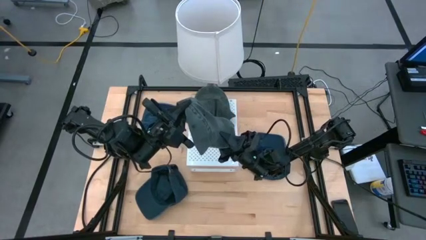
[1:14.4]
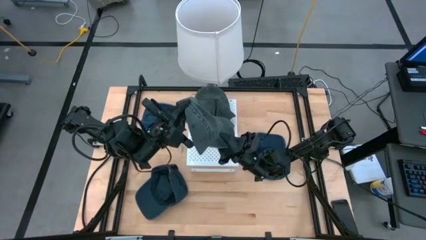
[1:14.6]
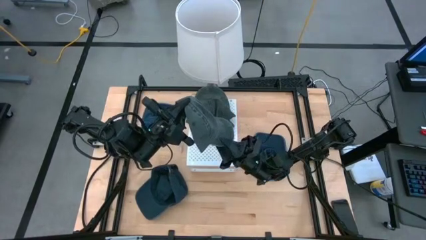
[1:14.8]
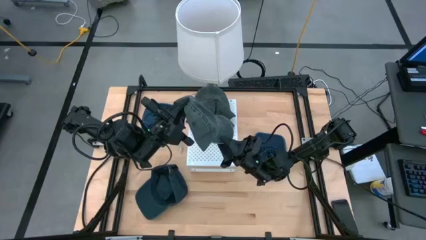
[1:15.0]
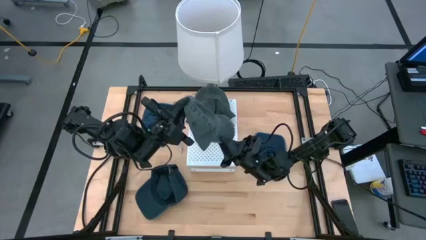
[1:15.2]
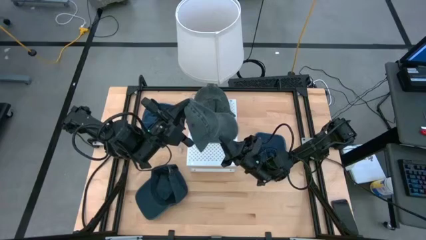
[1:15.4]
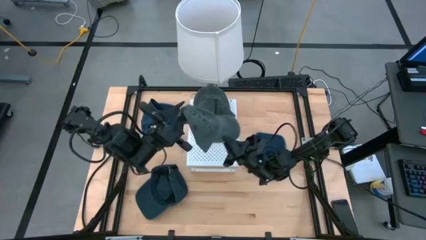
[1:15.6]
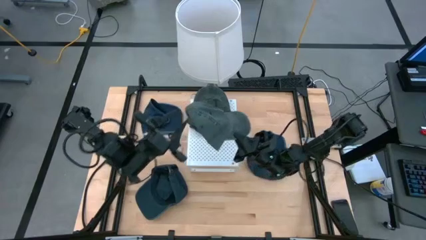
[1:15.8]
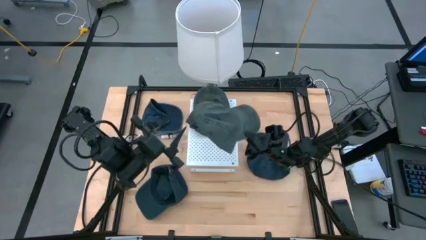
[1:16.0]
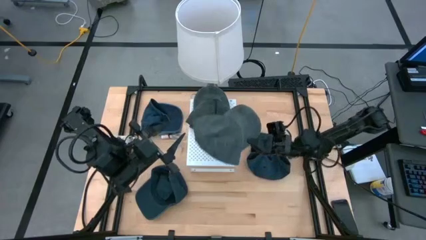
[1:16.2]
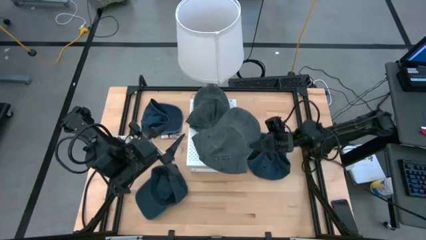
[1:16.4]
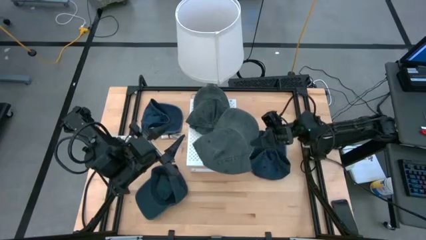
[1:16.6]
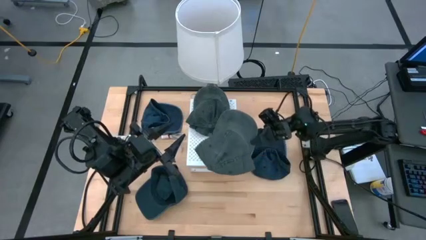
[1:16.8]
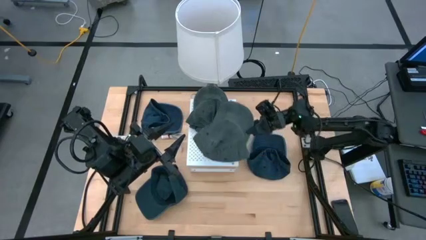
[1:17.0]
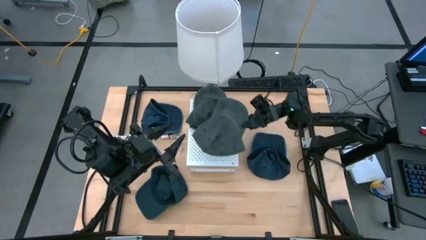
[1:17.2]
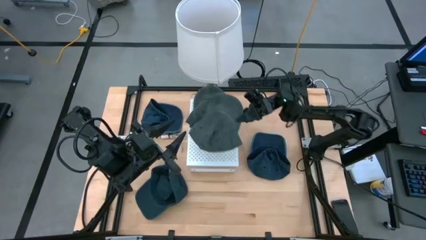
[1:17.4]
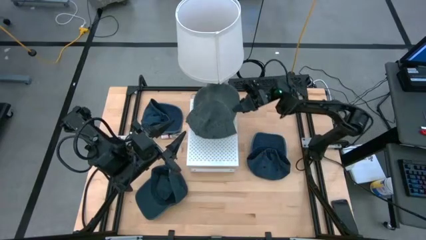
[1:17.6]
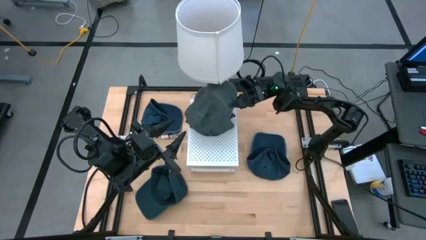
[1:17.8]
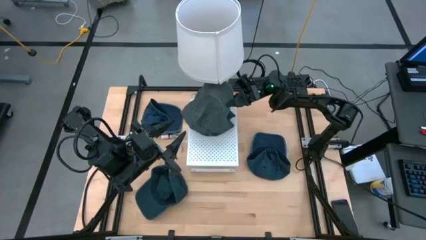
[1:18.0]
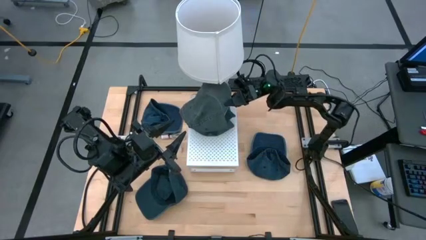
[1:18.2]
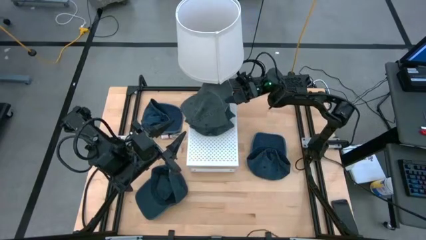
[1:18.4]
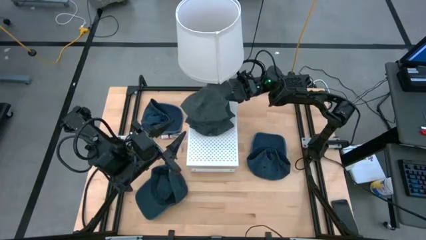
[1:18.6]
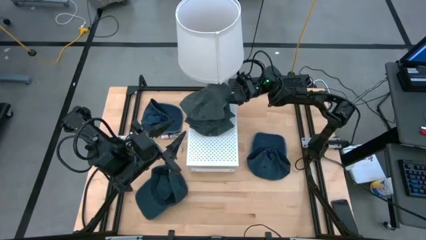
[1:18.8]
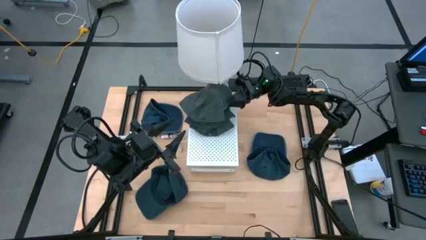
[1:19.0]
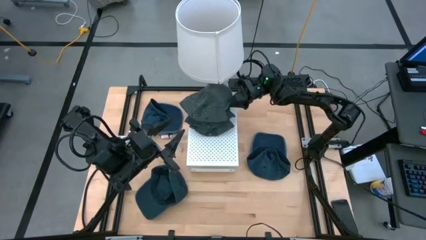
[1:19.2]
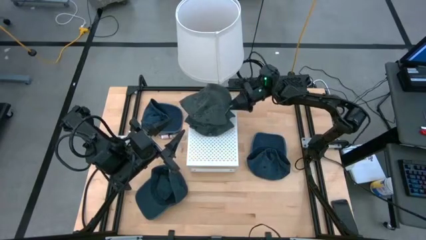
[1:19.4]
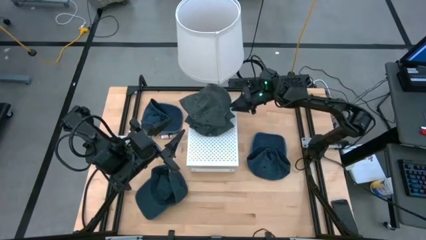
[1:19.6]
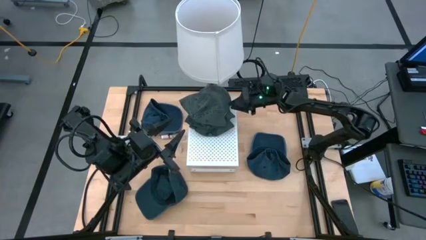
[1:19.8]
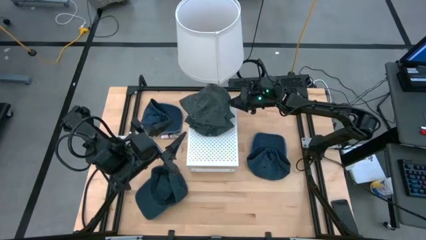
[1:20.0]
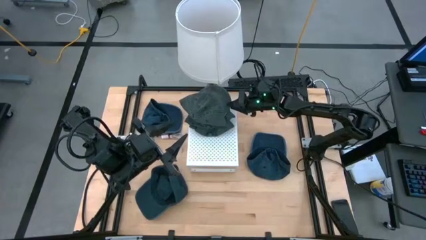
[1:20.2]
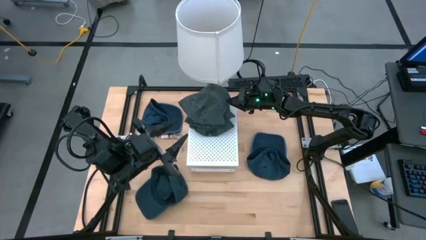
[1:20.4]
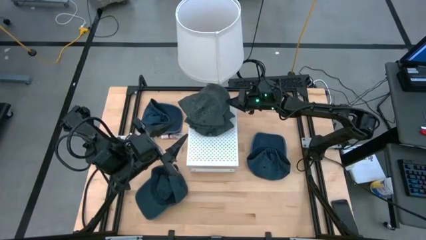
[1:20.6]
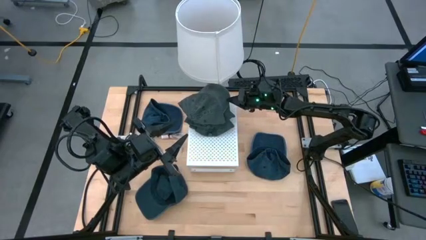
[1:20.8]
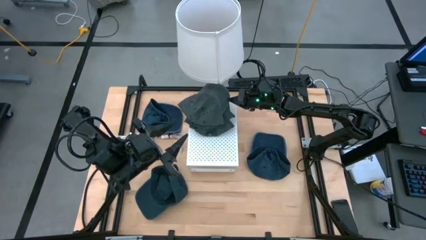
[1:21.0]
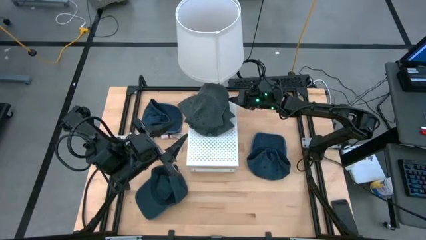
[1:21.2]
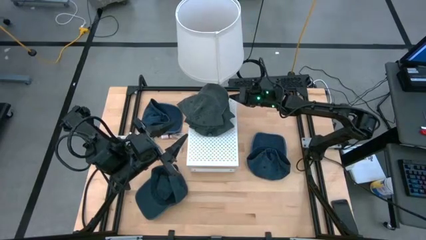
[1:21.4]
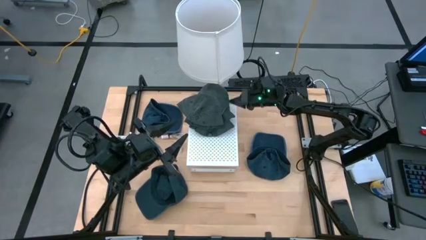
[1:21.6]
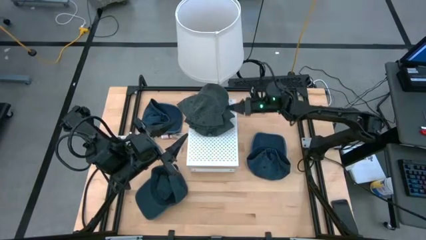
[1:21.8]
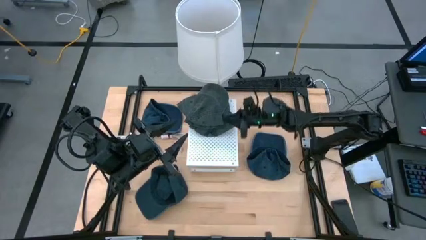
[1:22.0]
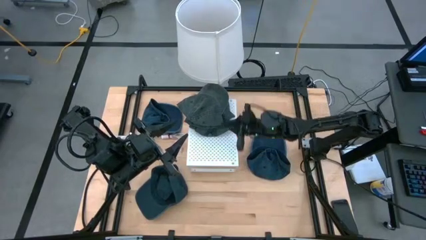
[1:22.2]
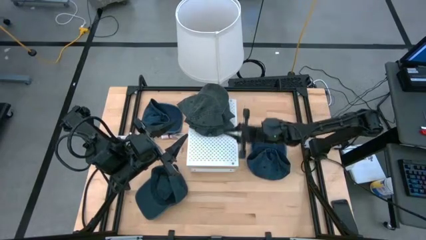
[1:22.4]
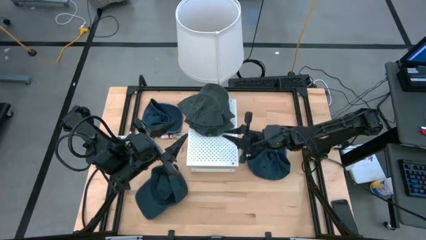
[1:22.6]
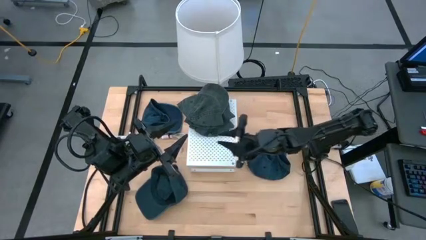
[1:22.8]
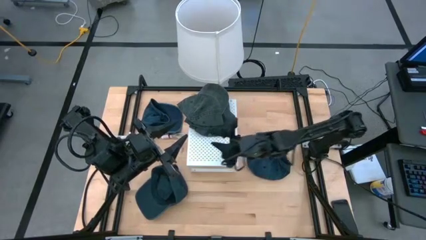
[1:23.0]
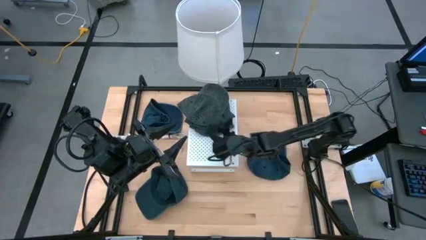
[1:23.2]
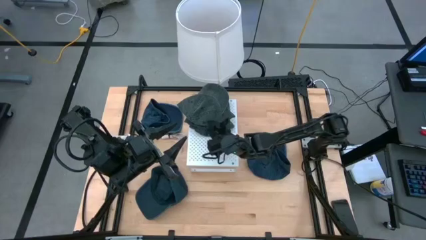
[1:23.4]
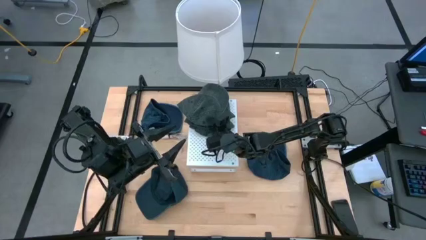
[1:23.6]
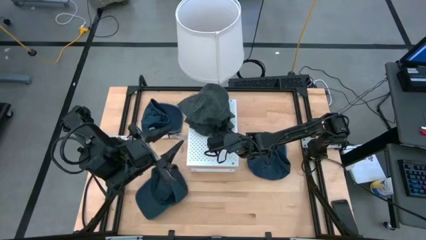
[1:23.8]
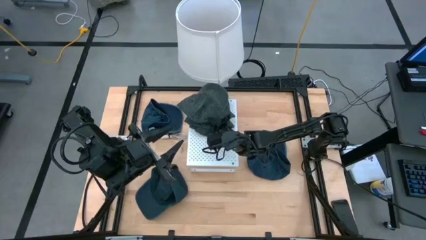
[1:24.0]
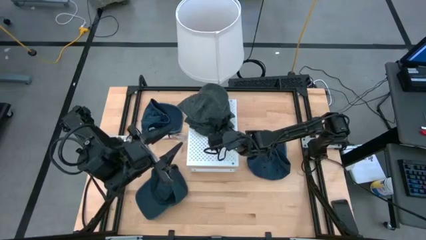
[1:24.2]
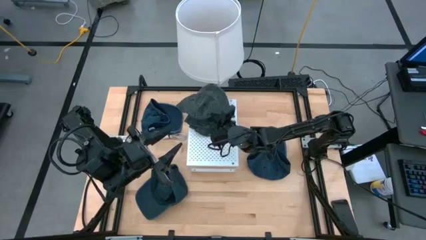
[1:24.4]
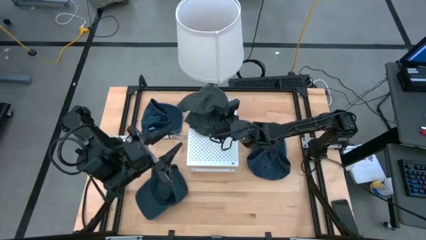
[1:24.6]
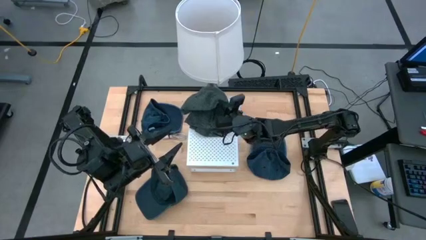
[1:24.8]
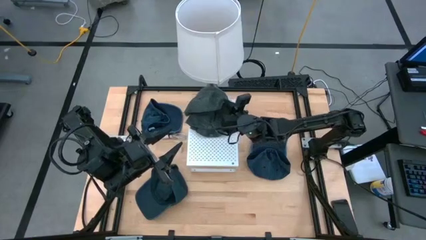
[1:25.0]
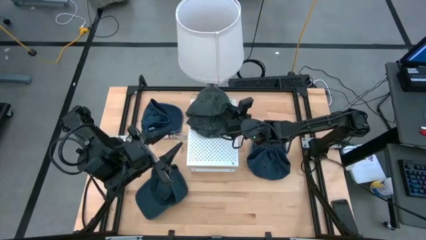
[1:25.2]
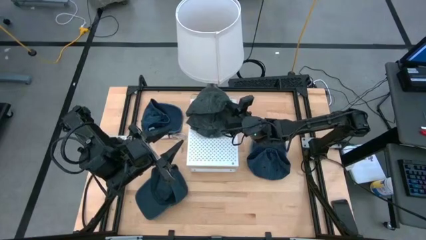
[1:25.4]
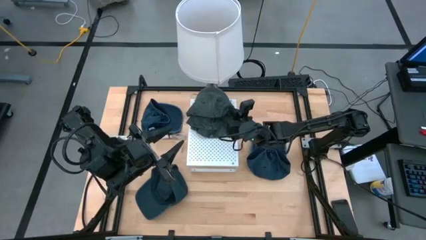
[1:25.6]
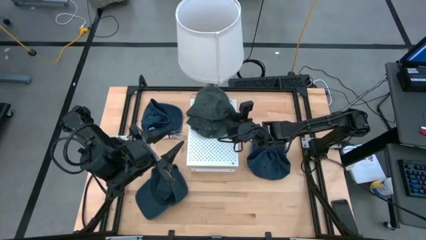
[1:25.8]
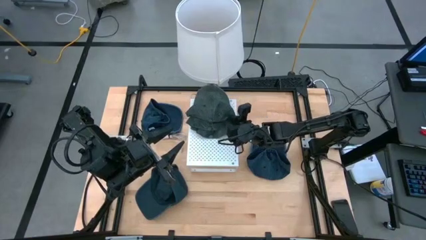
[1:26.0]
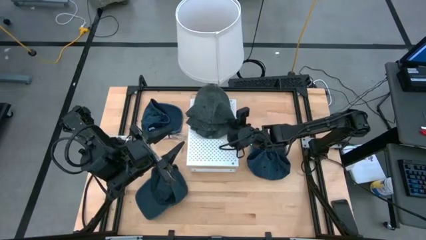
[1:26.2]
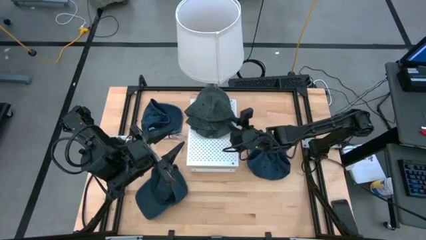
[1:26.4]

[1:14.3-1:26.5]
Task: Pick & Place hat
Stack the gray cap on the gray cap on the shelf

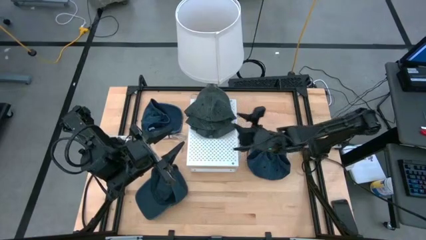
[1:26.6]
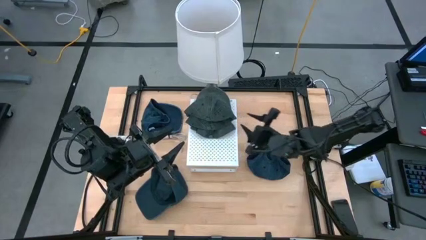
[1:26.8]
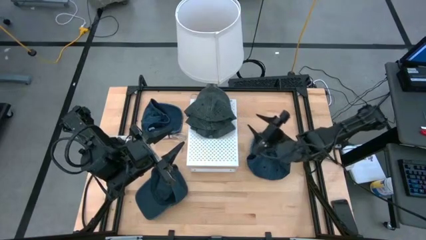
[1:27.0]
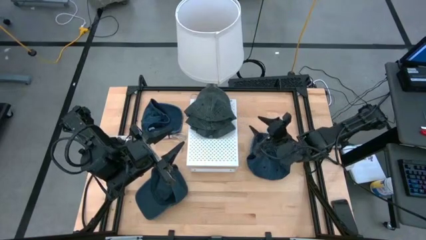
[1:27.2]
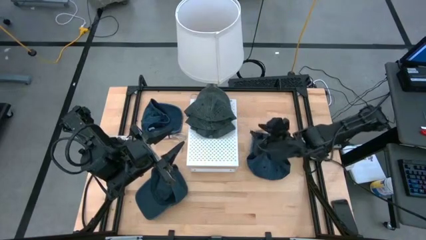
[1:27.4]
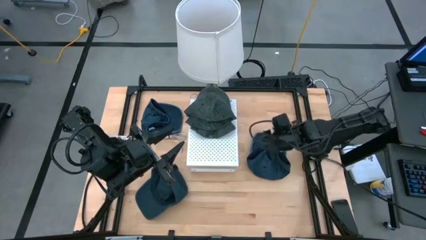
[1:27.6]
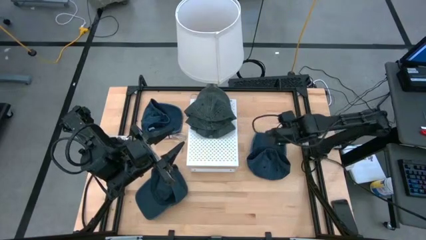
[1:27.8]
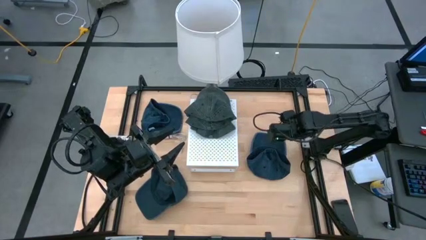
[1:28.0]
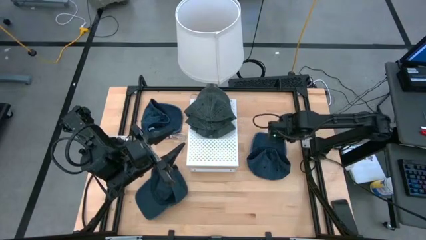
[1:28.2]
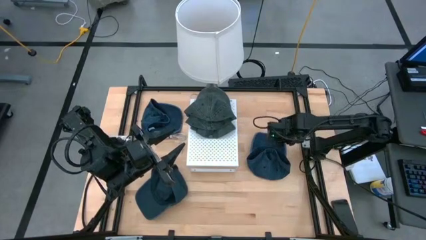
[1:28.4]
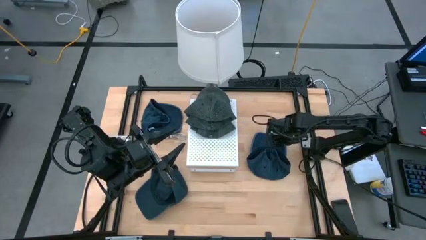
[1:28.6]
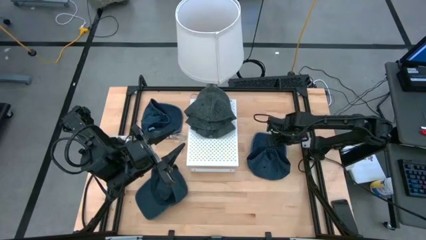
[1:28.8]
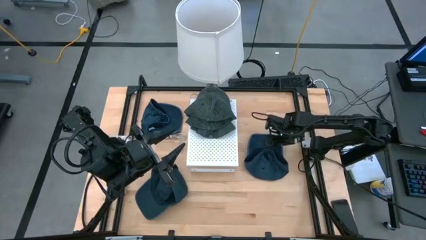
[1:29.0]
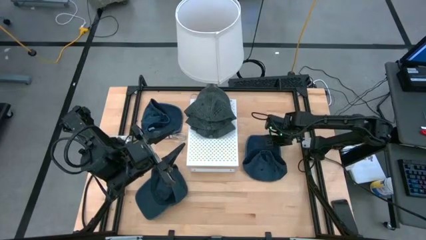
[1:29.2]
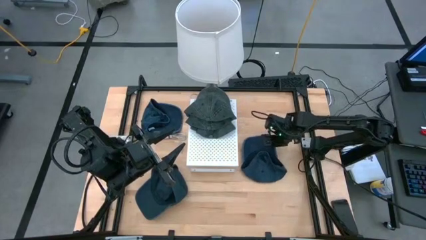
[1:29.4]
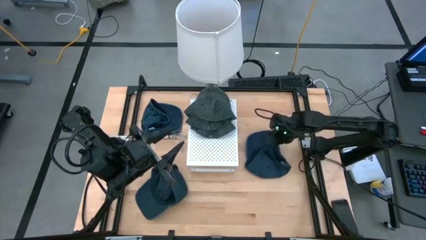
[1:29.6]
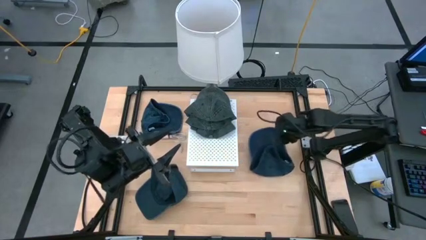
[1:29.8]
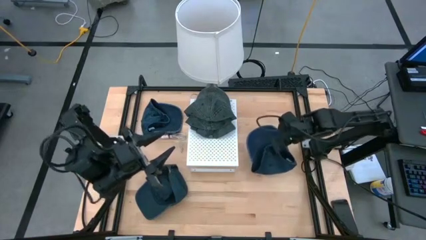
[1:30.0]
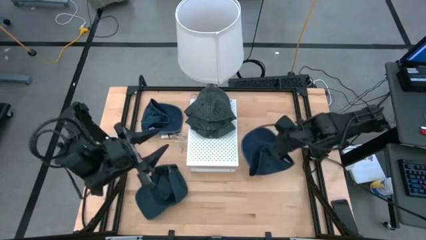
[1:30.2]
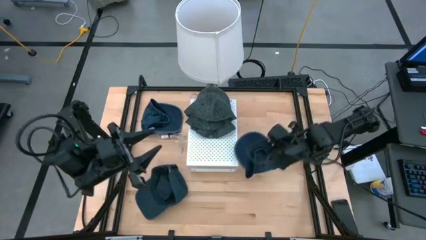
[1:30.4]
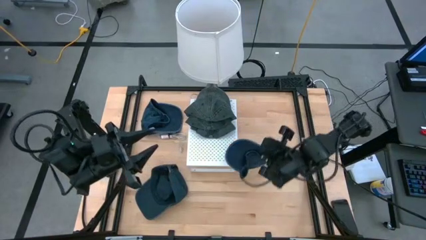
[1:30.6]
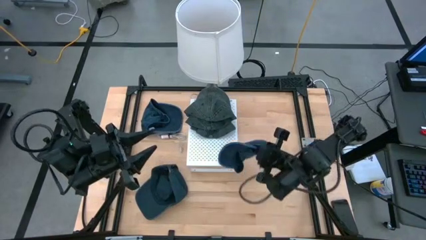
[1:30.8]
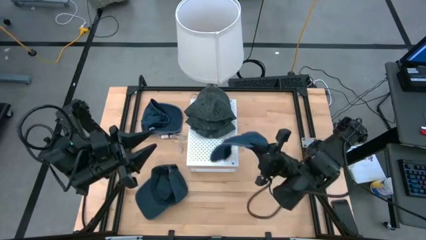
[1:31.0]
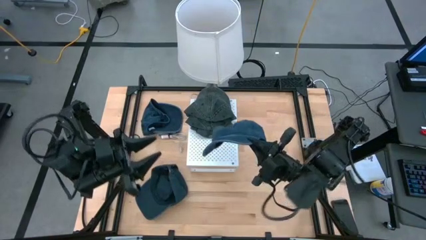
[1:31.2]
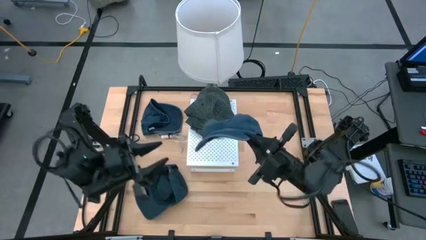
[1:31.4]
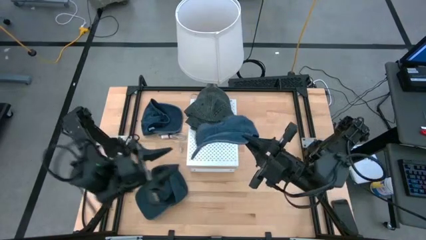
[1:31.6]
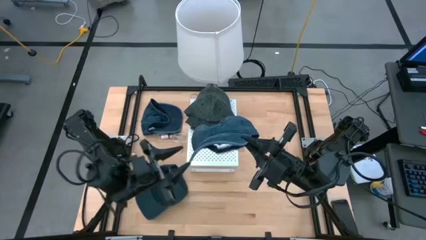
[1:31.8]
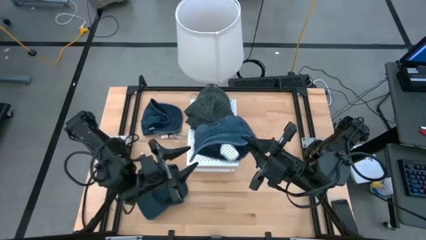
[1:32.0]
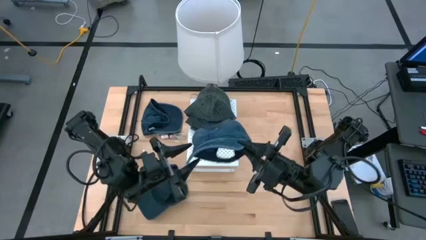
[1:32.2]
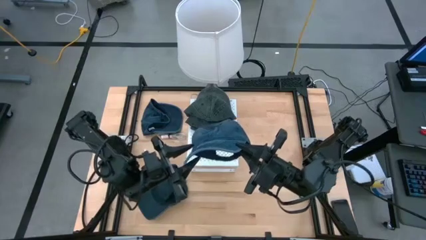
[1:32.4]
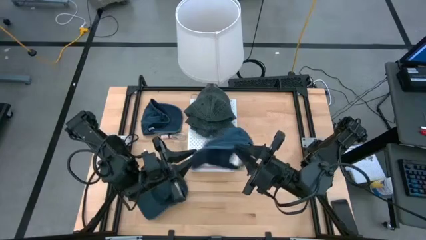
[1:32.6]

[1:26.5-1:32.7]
Put the middle right blue cap on the shelf
